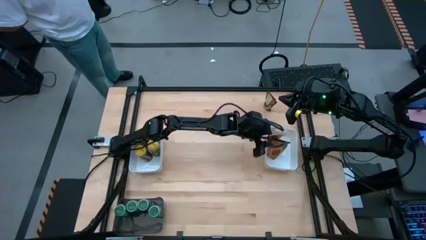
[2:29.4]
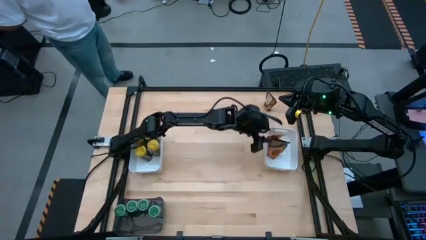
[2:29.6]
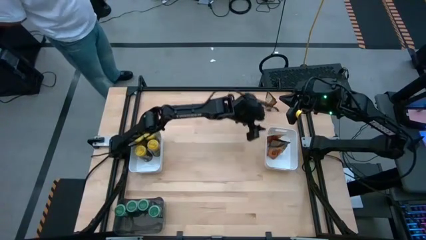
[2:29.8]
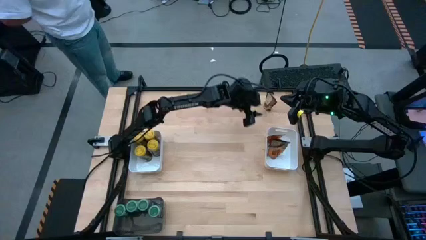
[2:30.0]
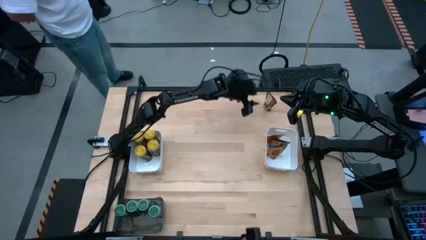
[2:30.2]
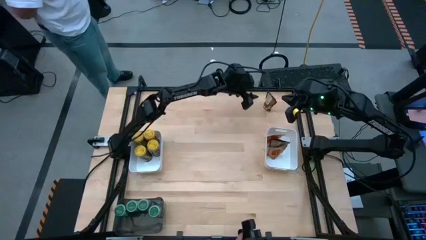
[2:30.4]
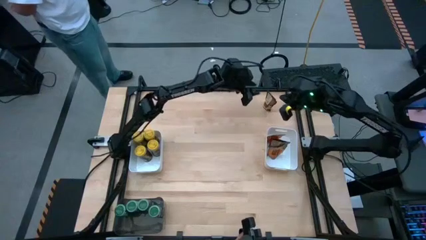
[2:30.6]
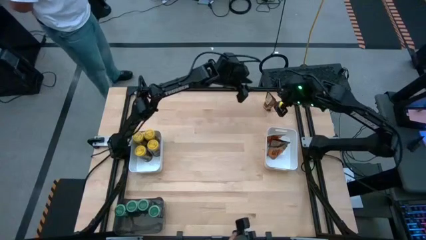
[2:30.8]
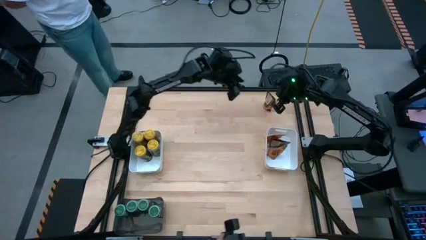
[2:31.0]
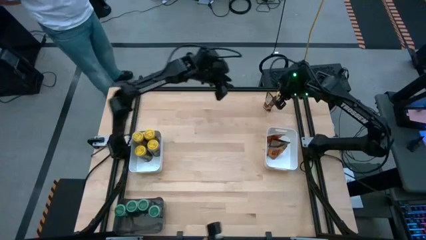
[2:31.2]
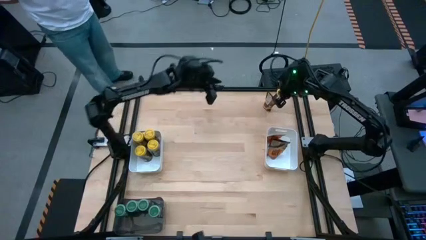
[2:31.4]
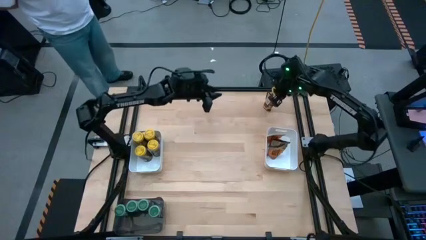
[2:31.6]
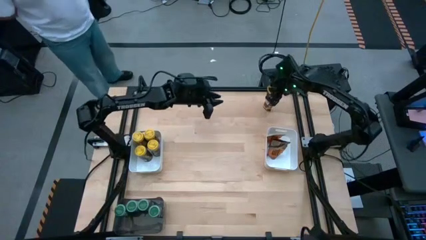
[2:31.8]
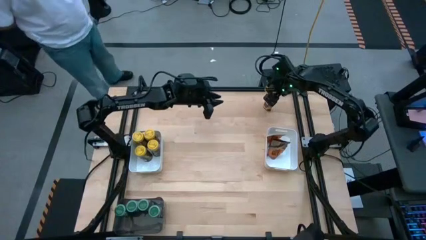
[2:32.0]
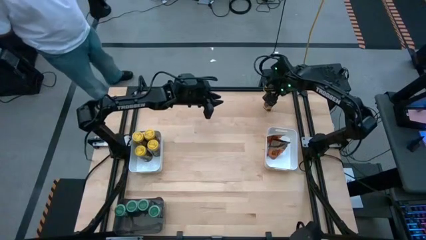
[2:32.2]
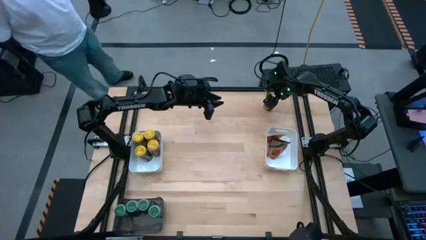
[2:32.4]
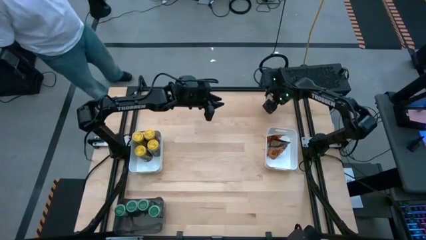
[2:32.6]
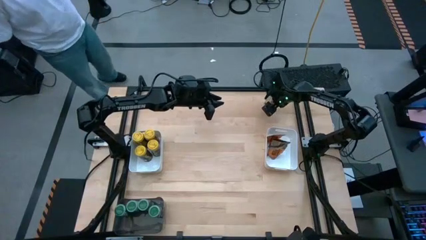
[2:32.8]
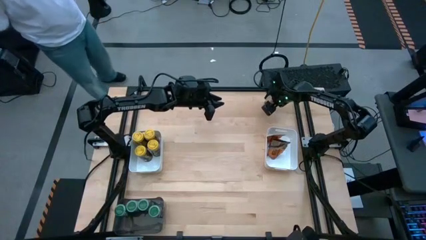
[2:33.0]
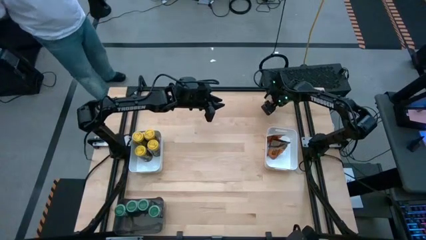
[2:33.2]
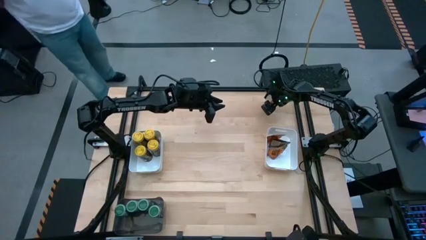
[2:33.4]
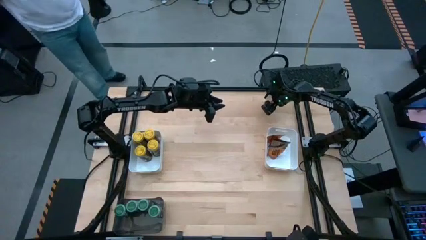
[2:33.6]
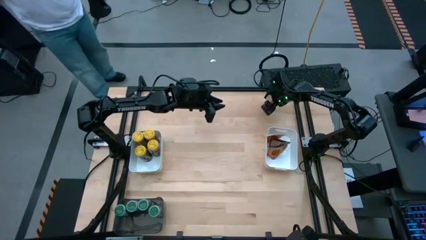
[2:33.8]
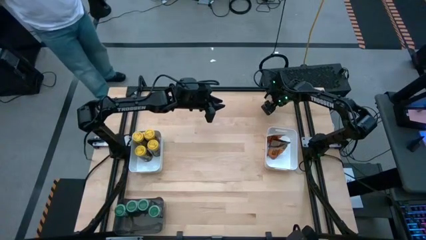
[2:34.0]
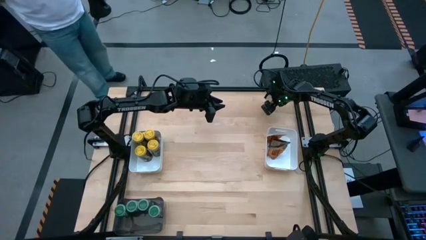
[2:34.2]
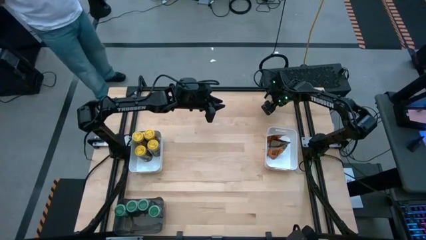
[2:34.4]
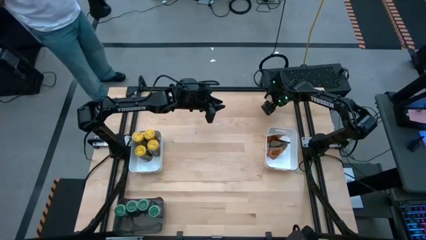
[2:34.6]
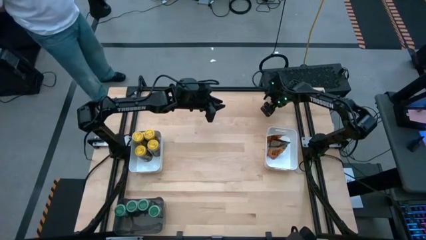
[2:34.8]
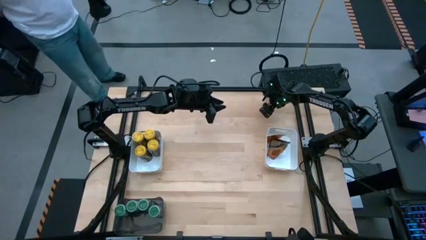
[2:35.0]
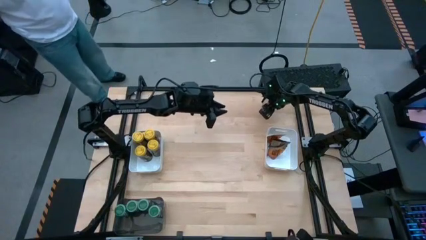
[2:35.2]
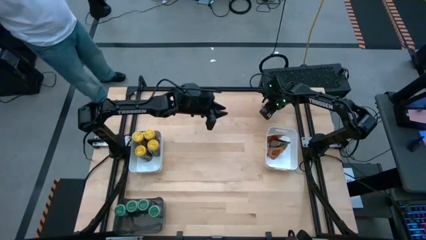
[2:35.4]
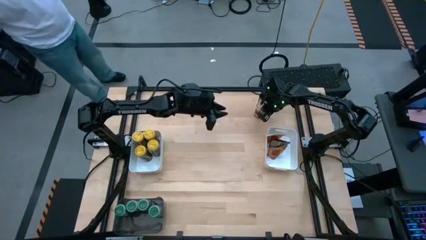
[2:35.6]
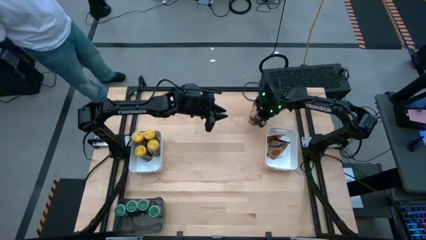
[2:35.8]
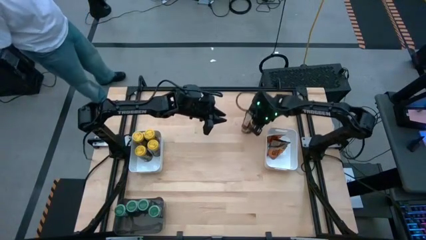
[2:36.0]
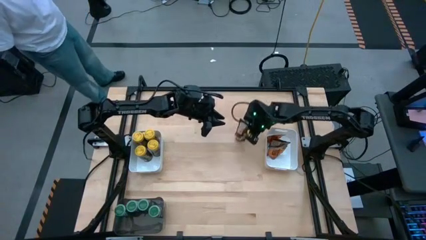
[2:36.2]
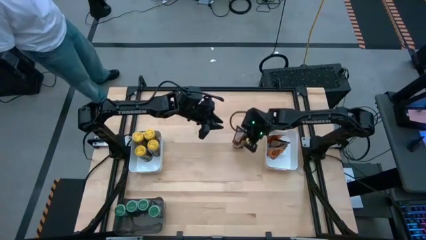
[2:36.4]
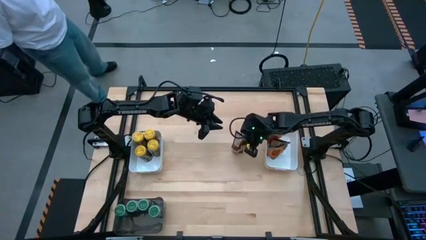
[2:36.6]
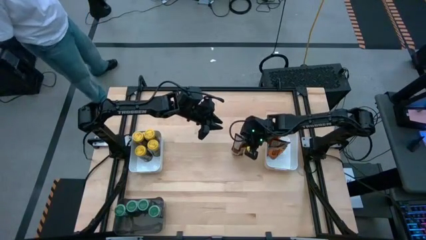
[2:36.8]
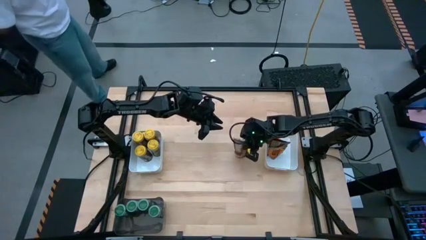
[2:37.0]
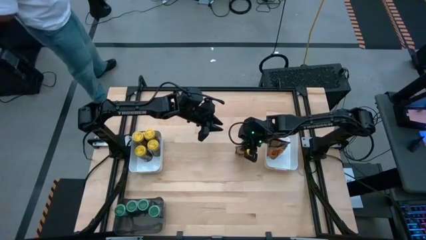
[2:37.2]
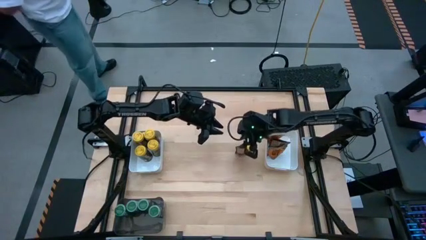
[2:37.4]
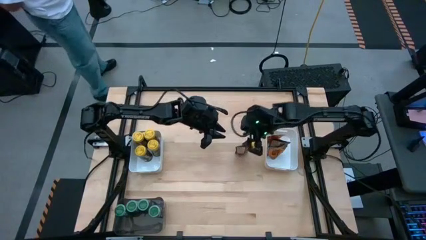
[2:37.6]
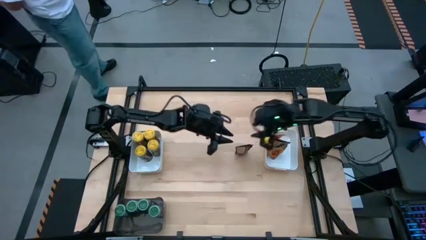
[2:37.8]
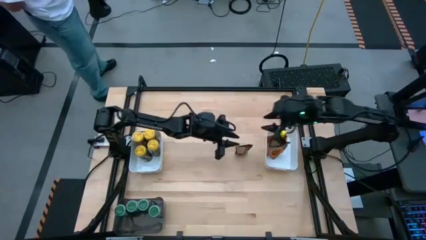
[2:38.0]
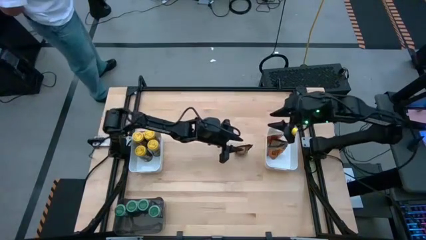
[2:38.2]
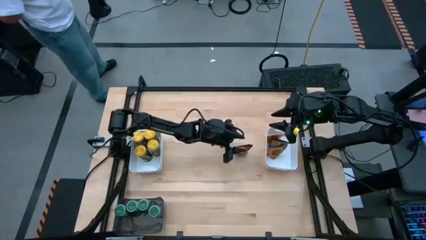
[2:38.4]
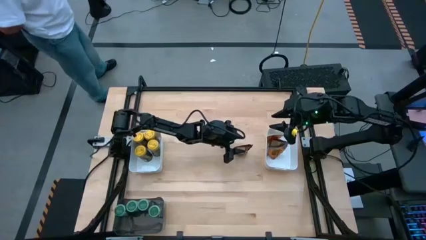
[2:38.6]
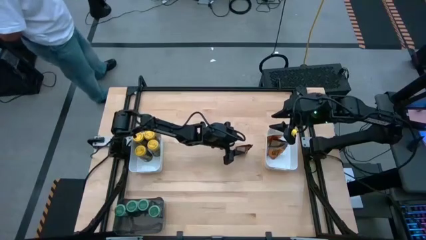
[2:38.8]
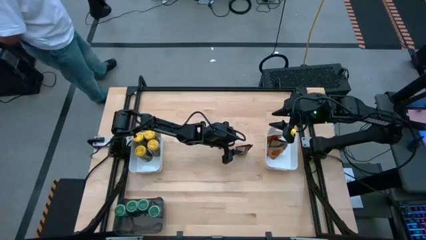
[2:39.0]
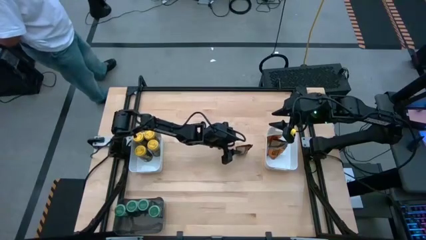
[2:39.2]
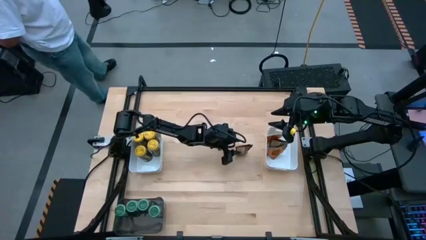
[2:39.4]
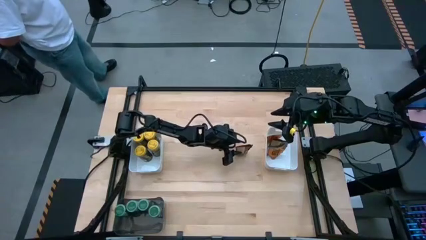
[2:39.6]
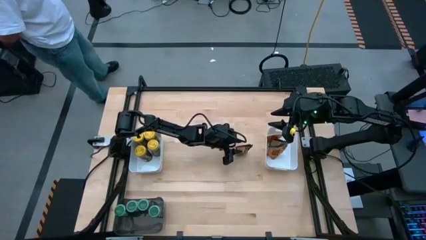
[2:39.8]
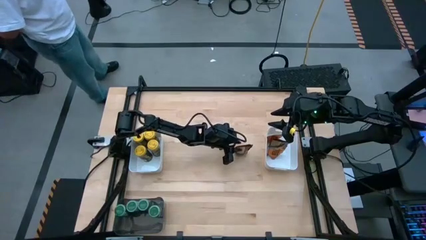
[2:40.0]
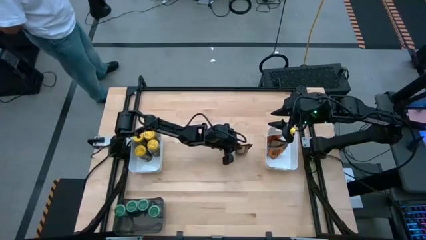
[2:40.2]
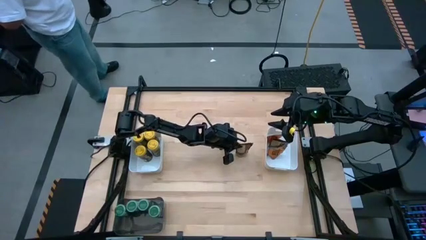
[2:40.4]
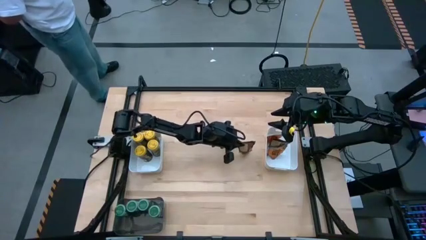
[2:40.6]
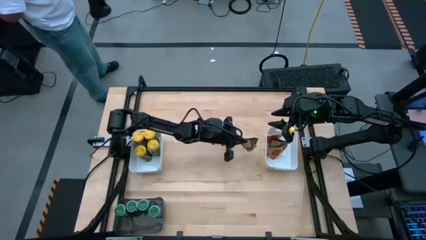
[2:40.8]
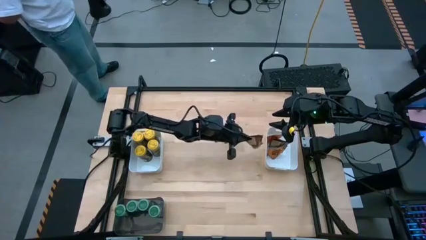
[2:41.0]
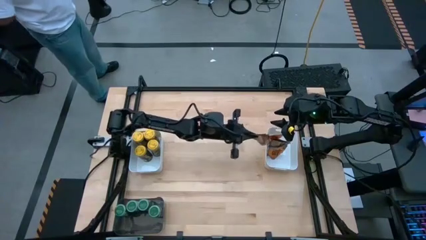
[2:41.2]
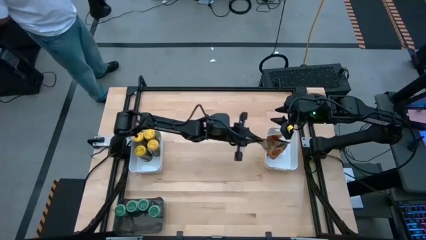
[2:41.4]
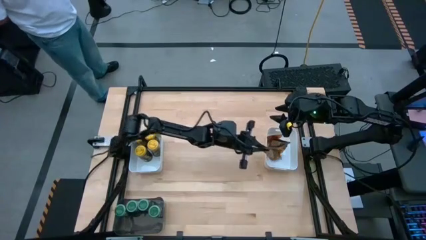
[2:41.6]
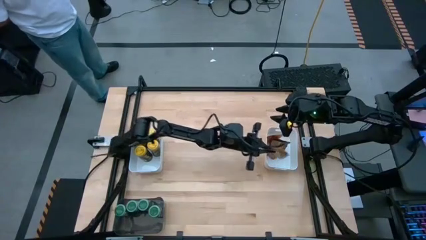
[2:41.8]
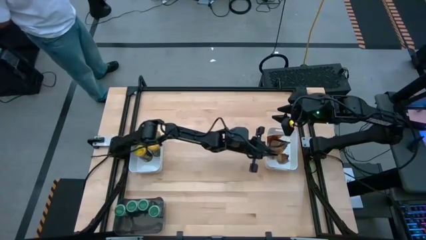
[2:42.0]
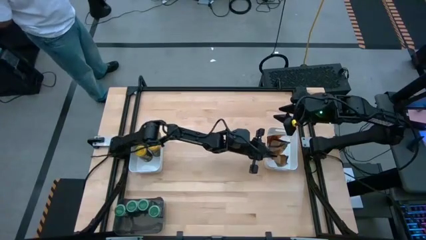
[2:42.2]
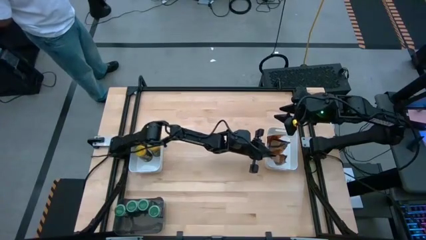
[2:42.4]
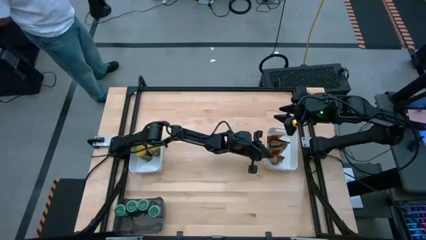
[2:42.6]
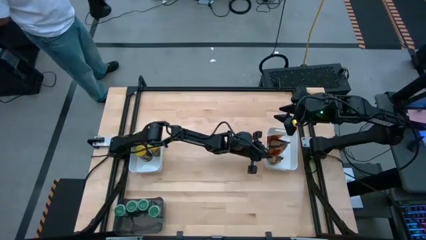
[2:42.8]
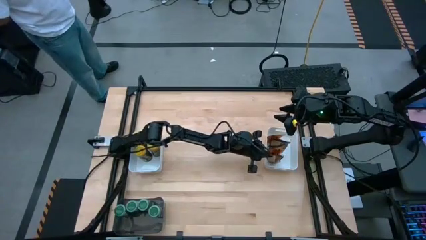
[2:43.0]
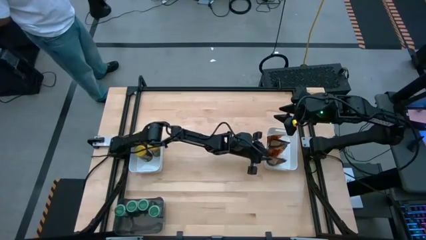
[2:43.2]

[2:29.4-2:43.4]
Task: Sort spices by type
Put the orange seasoning bag into the right white bin

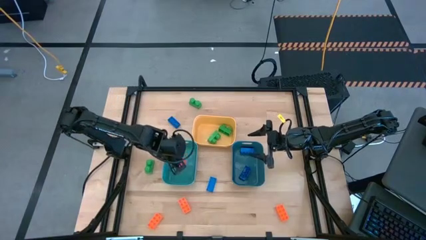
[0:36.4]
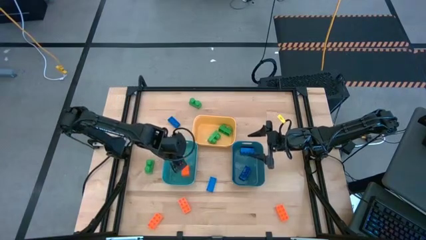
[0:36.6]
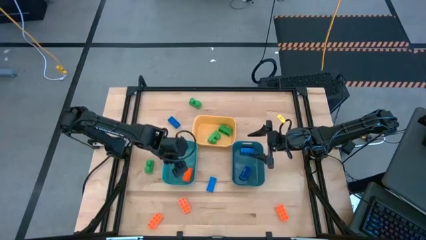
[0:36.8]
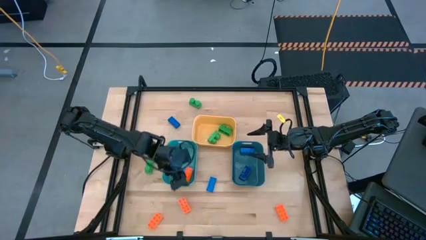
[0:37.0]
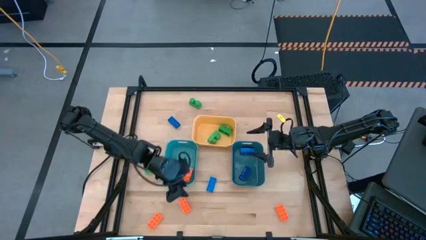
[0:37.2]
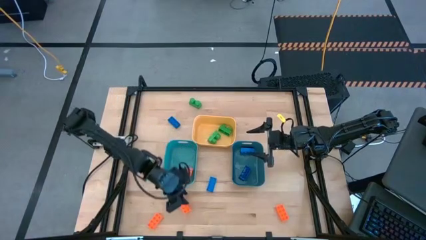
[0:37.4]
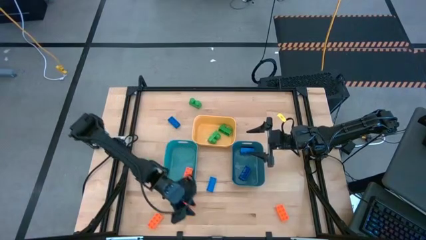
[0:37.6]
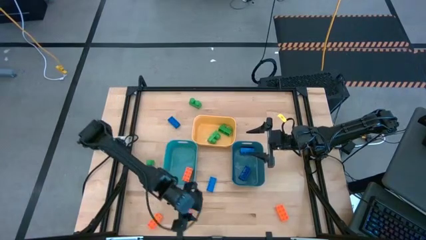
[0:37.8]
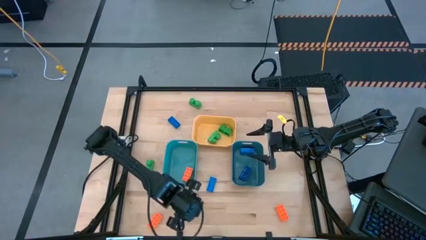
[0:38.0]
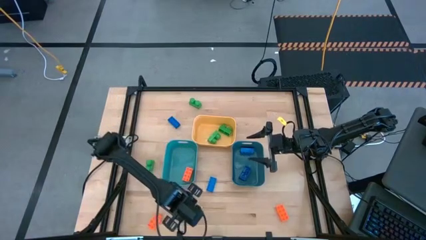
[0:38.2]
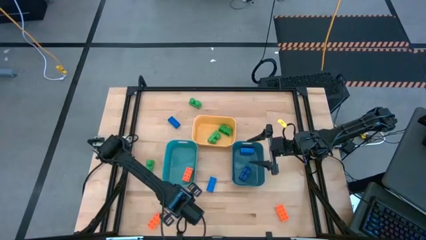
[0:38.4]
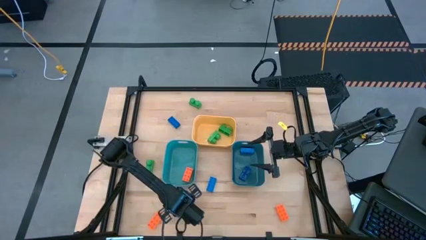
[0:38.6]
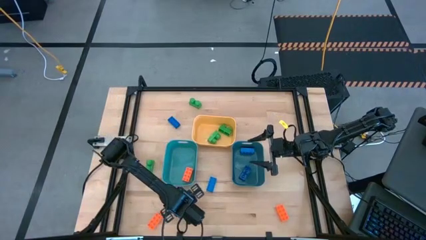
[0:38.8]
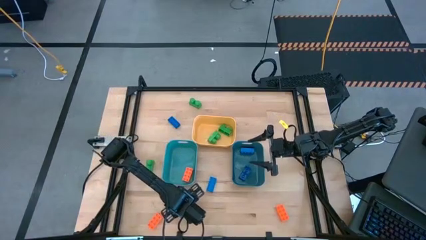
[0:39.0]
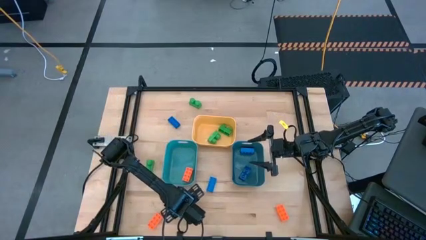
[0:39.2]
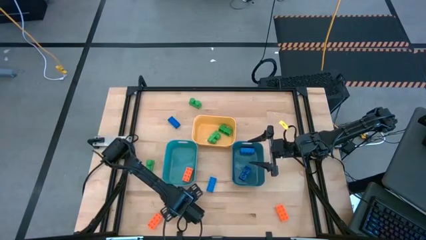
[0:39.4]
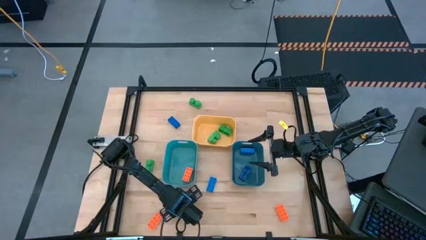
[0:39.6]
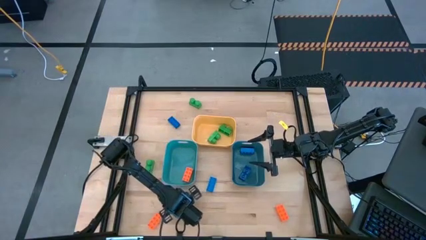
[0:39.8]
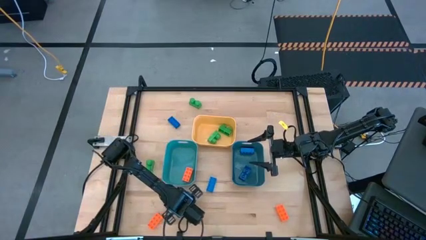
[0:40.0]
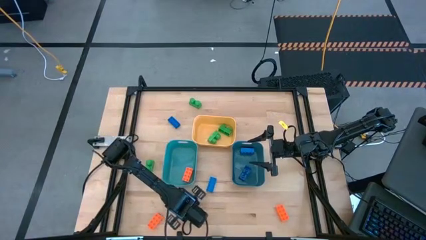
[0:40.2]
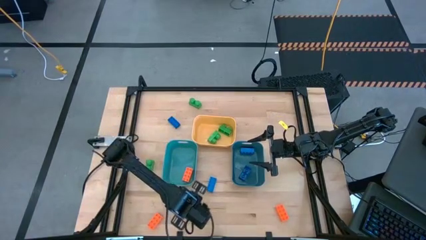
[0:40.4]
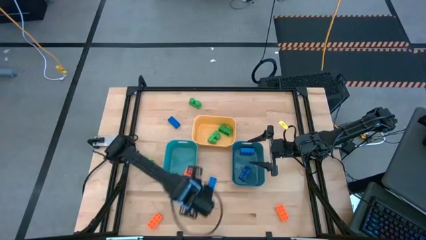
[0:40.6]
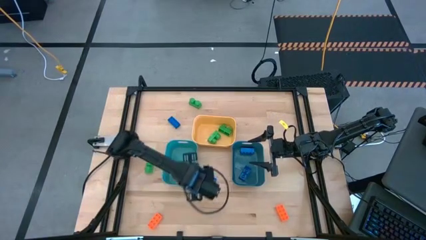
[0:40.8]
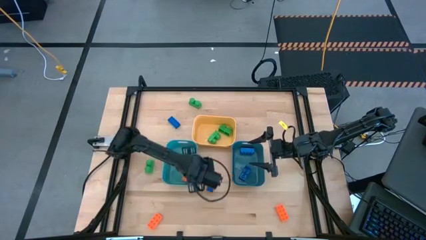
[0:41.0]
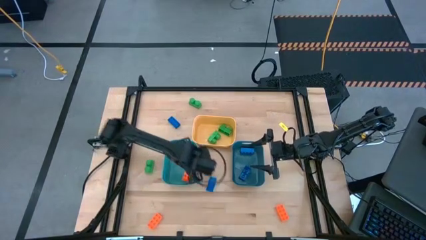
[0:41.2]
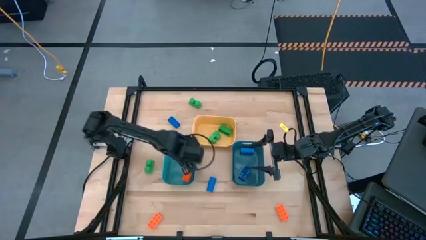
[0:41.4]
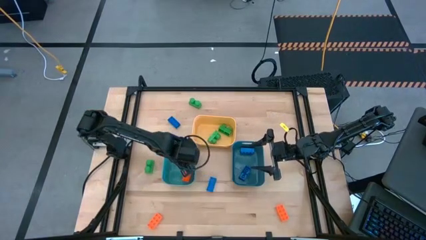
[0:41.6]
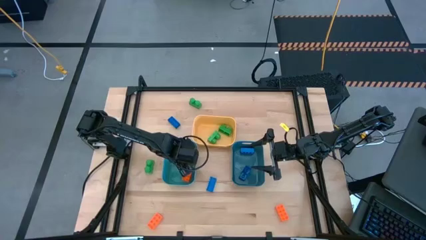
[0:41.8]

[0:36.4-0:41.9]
Task: Sort & place blocks by color
Put the orange game piece into the light blue bin
